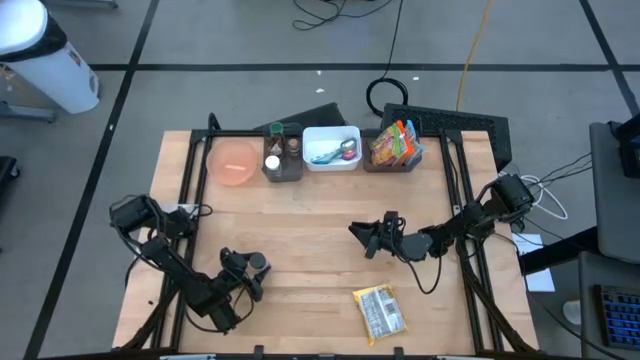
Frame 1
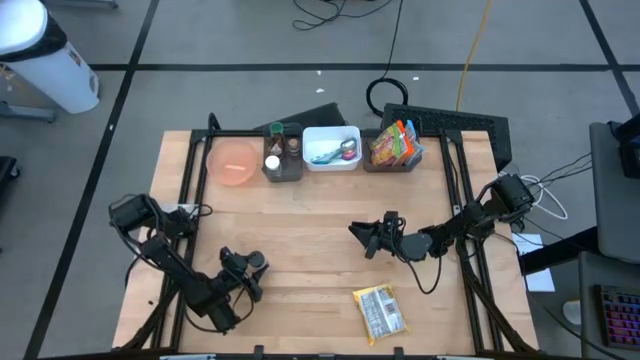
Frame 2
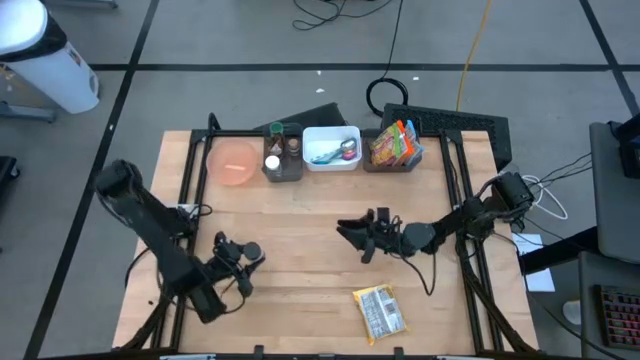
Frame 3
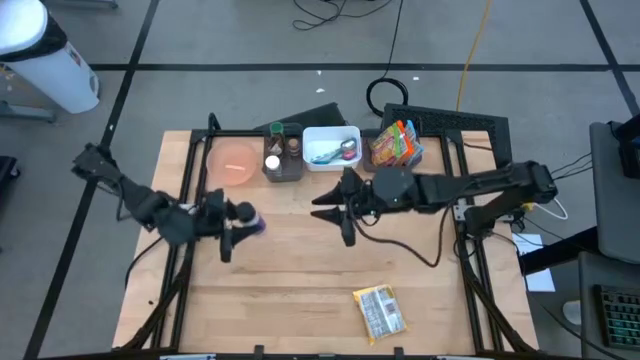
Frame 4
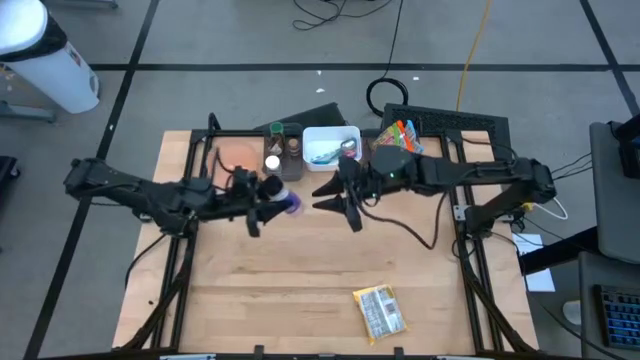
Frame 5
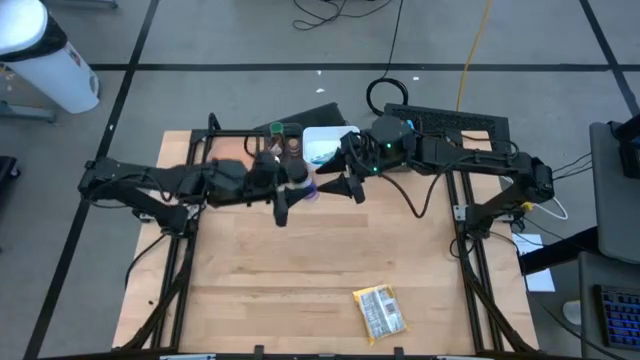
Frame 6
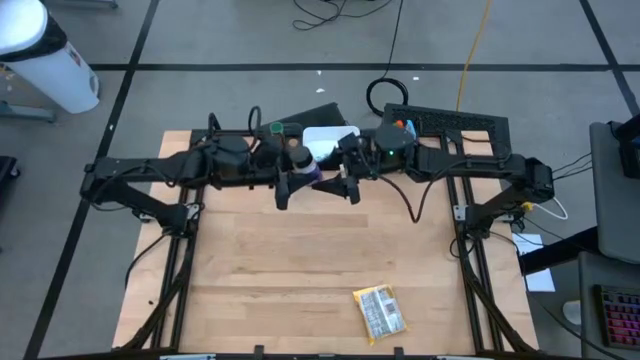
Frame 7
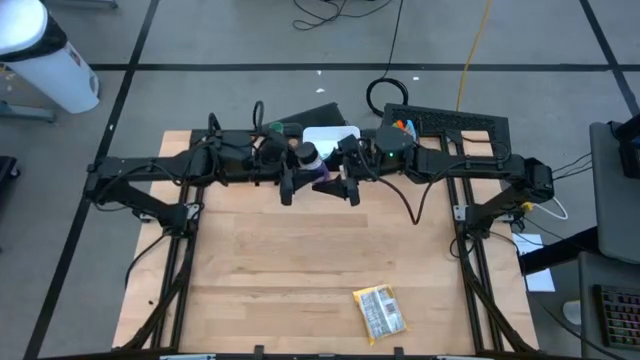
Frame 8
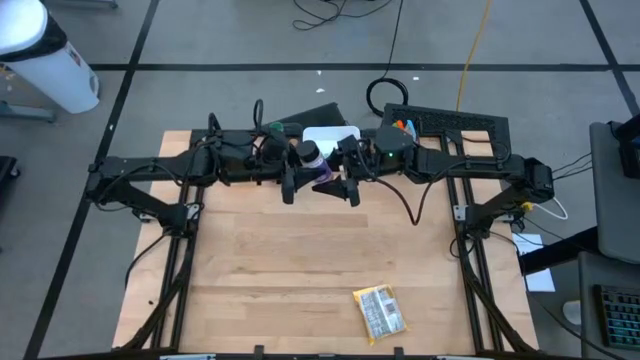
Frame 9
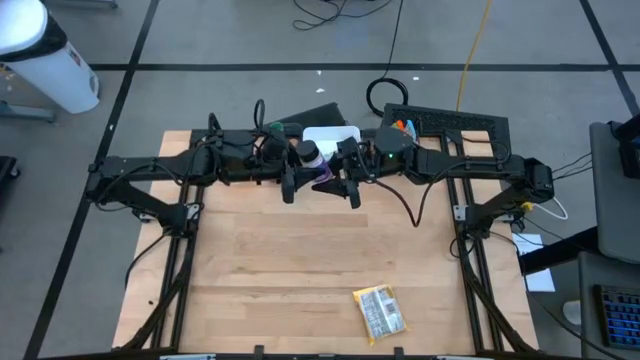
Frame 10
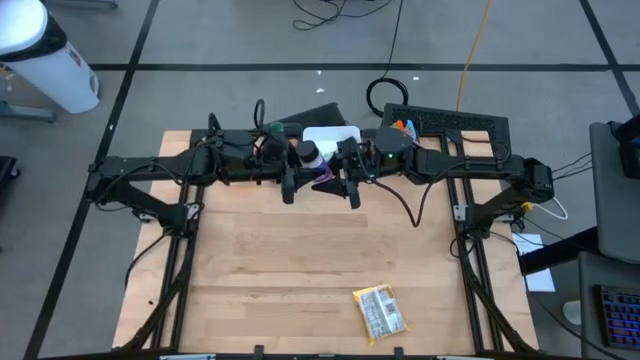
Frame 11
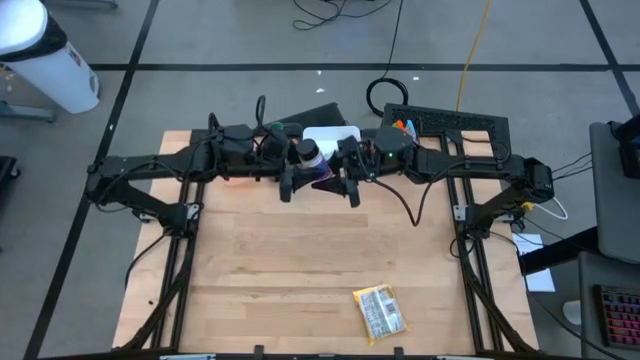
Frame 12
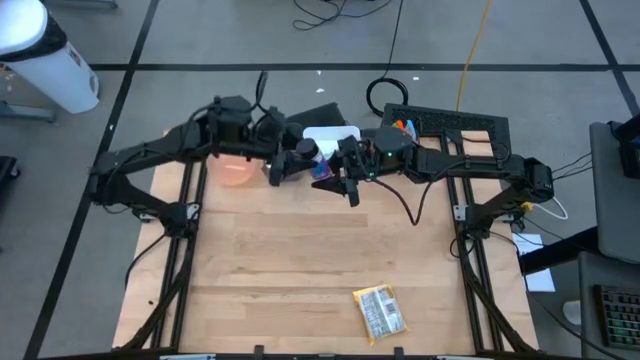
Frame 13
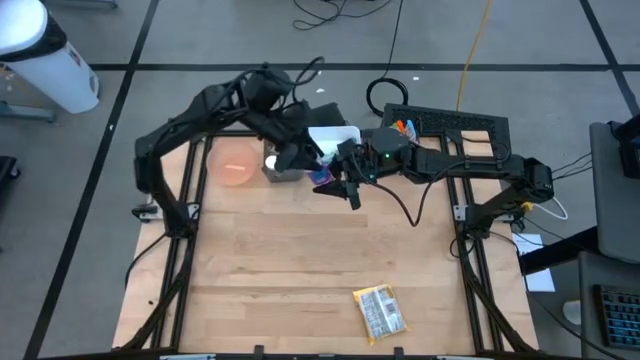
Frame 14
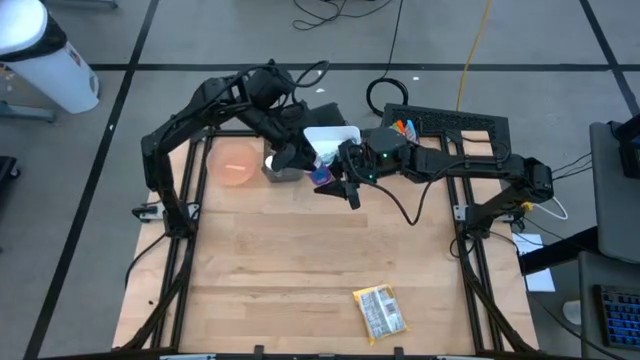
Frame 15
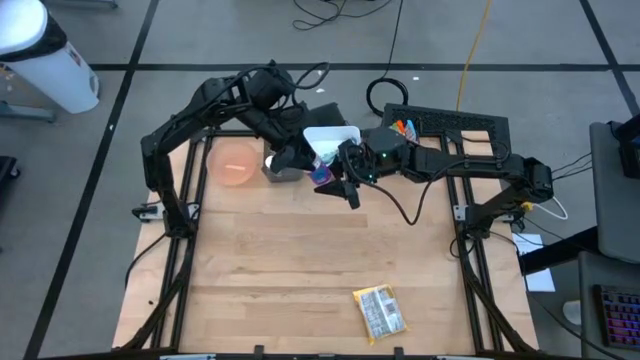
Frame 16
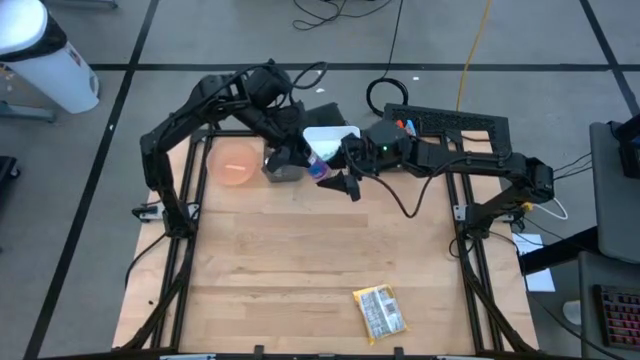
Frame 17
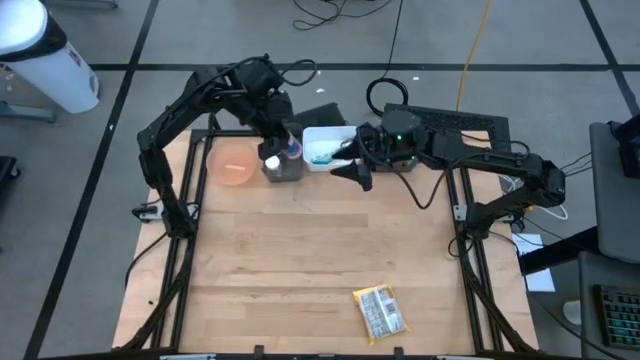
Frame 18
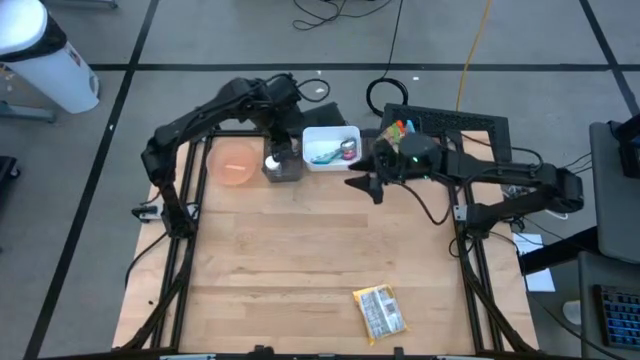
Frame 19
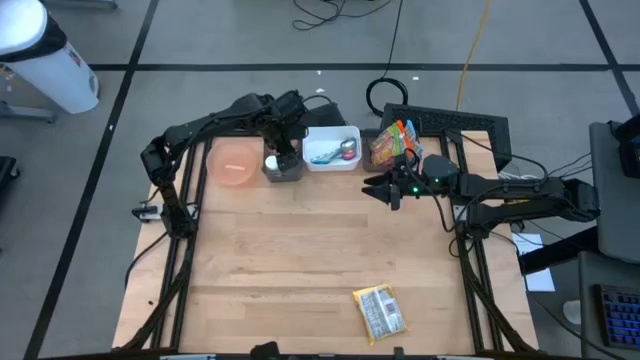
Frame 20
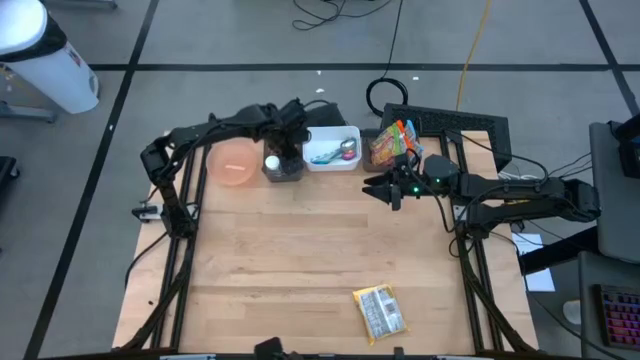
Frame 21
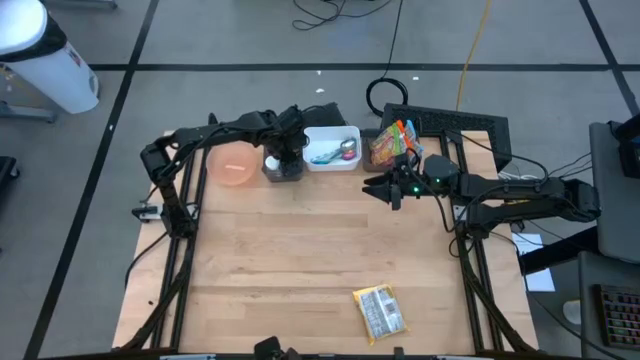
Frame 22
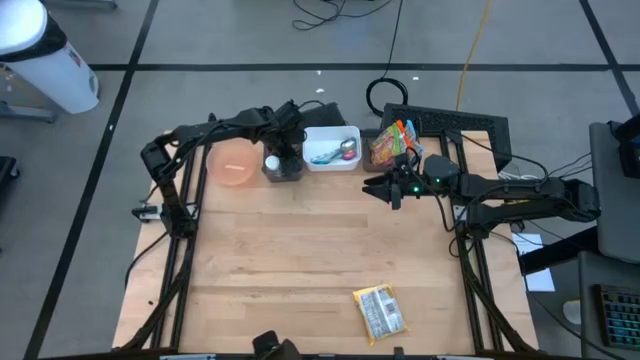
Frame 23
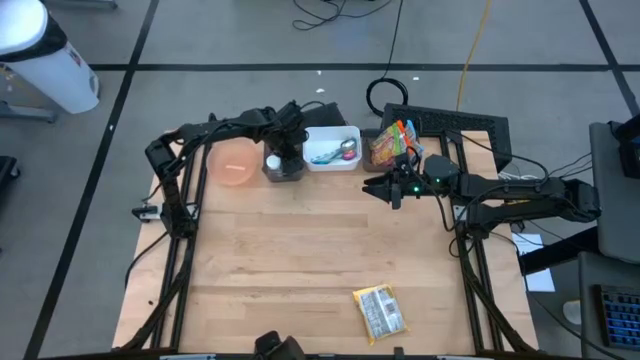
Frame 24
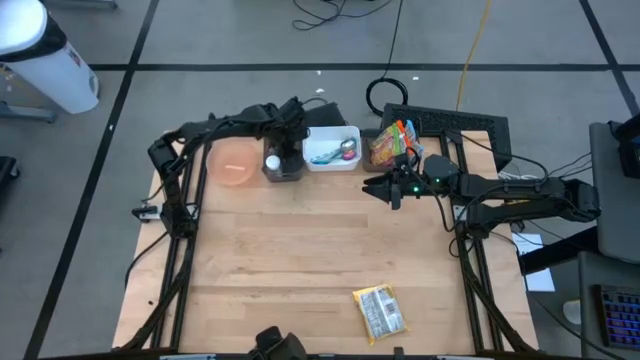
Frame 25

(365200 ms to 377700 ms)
Task: Pick & Place Food Item
Put the black seasoning bottle into the left black bin

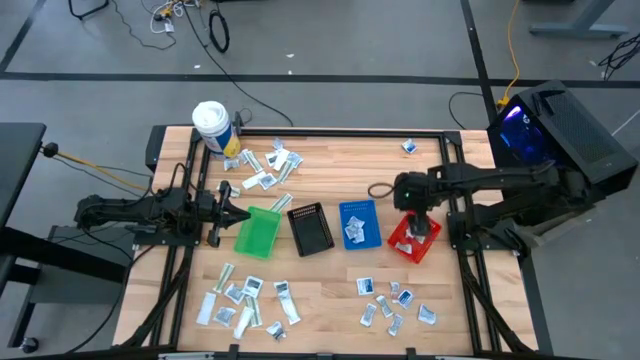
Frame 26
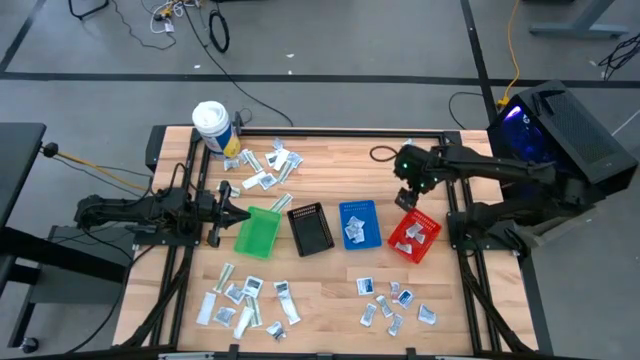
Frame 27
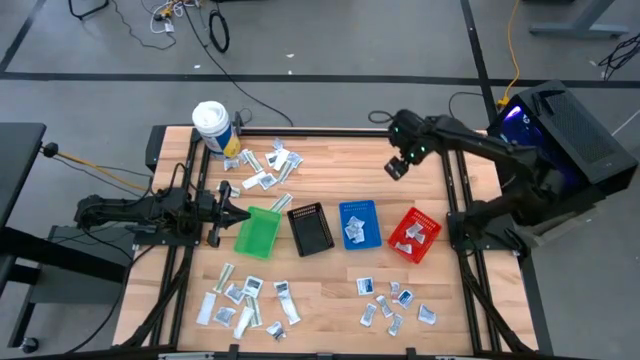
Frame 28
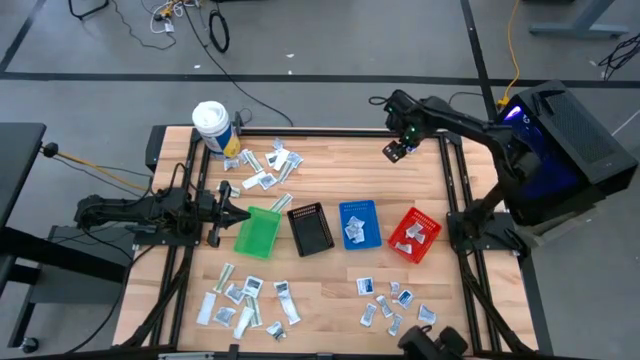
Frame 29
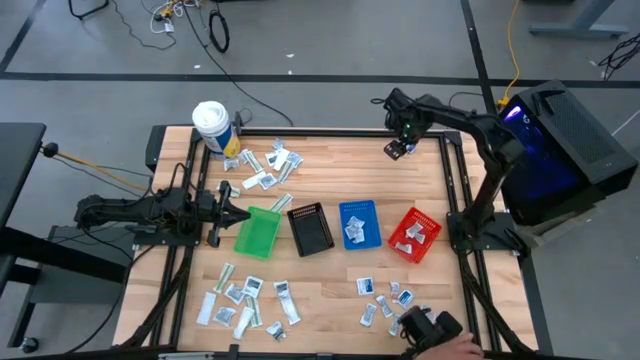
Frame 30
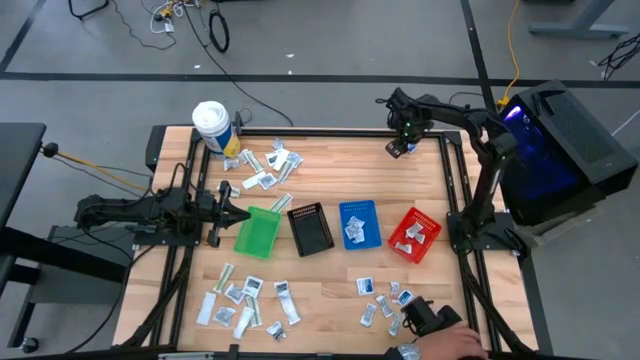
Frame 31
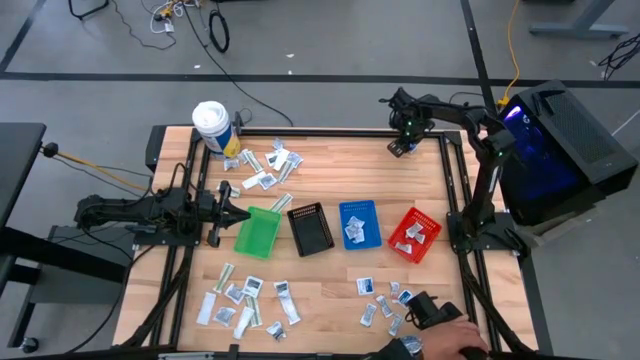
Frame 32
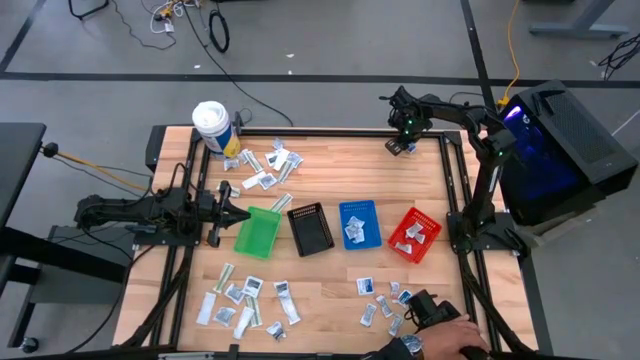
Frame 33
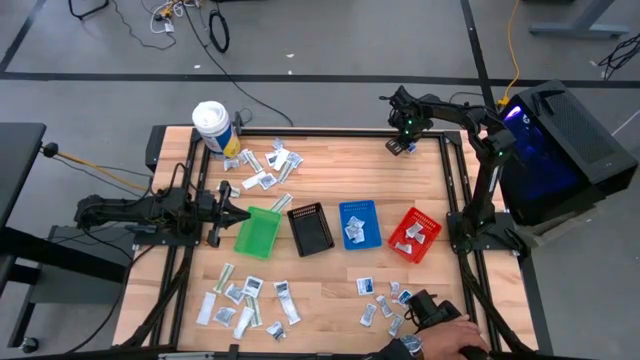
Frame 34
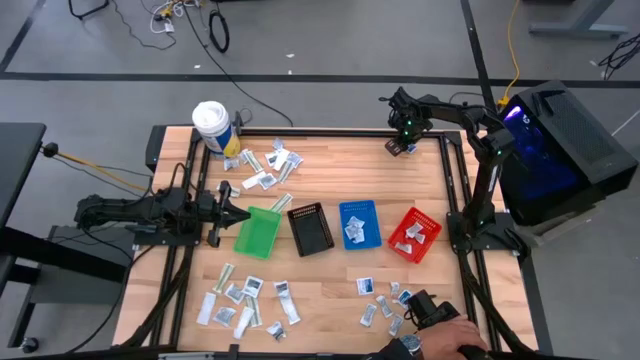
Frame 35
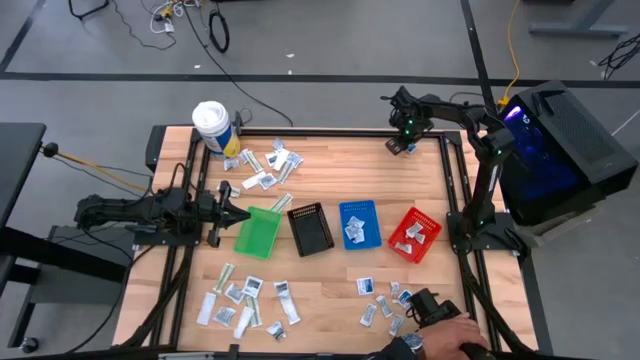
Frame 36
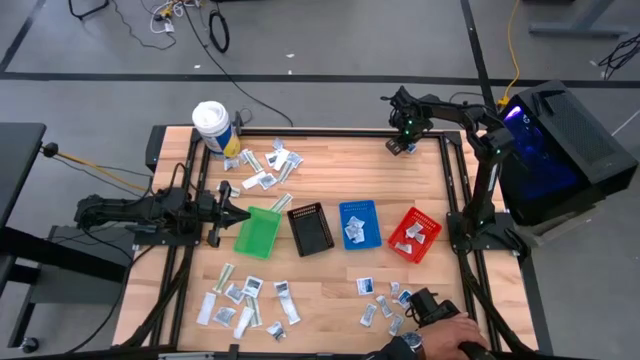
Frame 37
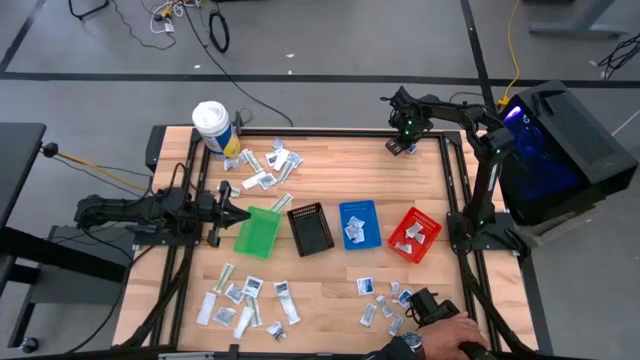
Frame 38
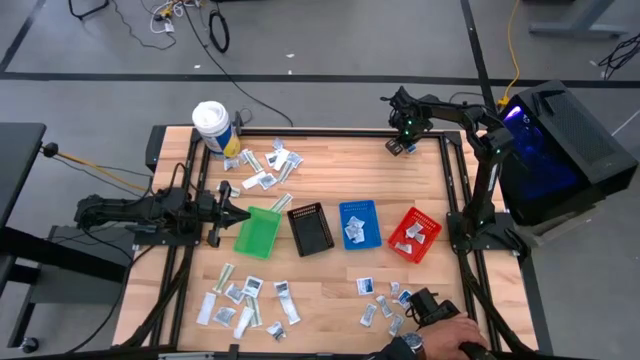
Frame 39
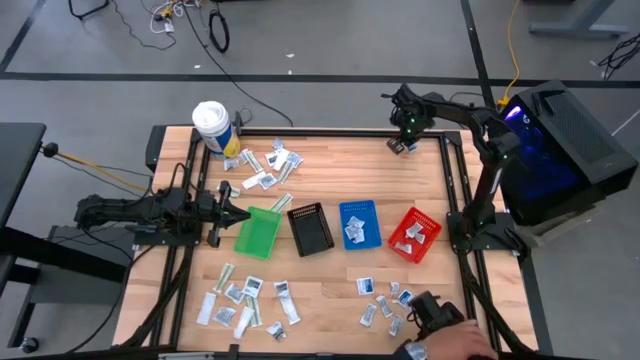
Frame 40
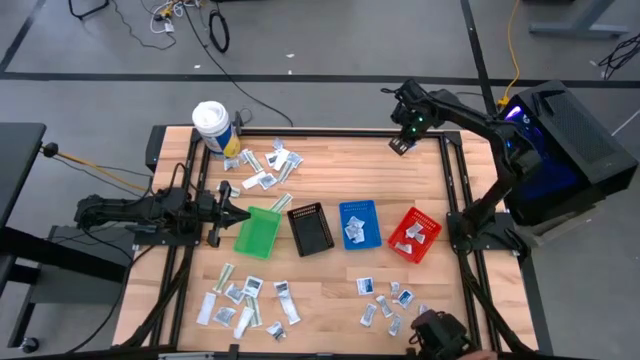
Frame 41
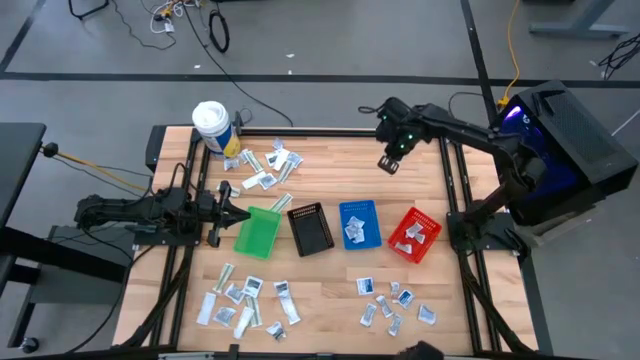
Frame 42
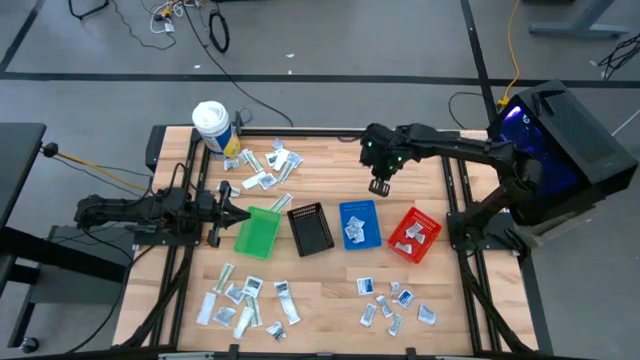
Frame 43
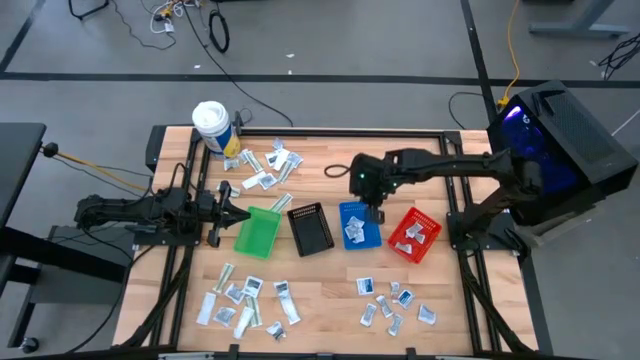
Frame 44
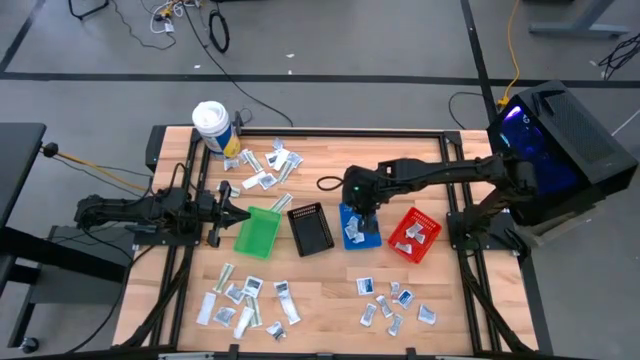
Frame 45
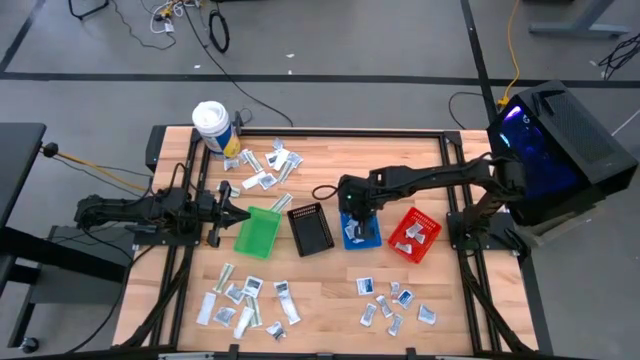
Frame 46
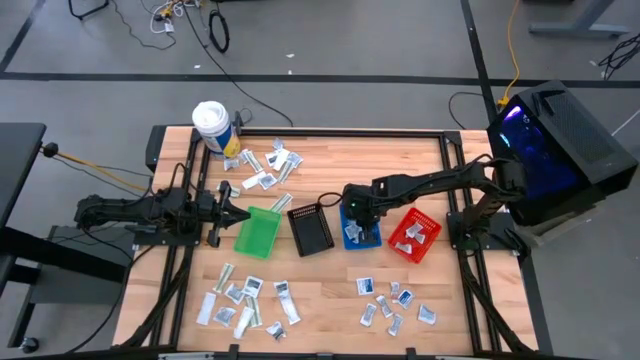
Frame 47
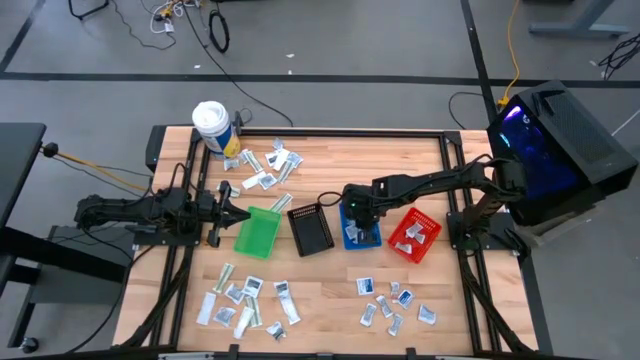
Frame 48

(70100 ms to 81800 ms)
Task: Pick & Place First Aid Supplies
Put the alcohol pad into the blue basket
